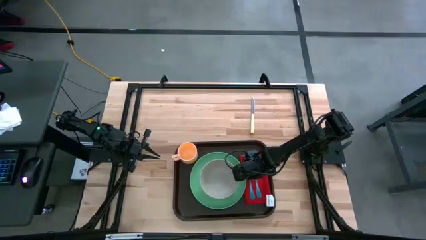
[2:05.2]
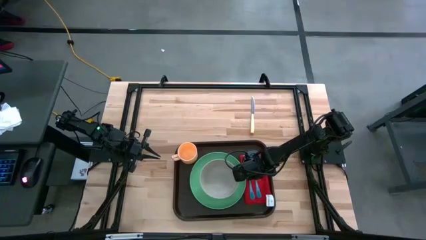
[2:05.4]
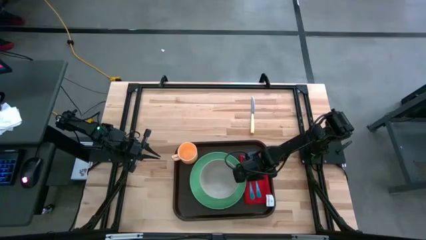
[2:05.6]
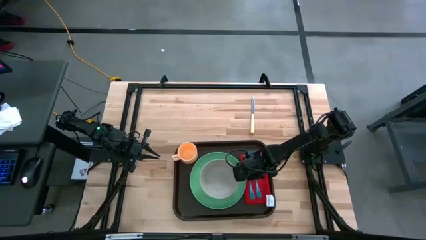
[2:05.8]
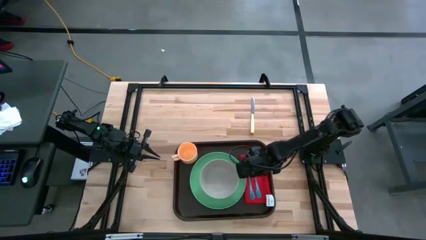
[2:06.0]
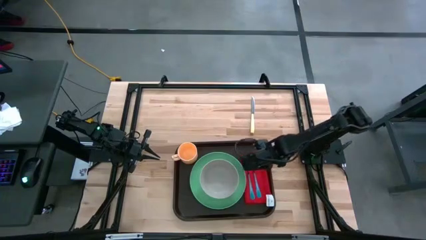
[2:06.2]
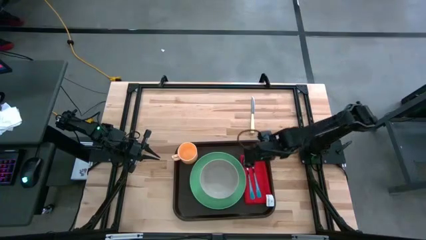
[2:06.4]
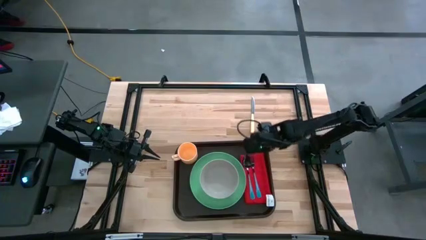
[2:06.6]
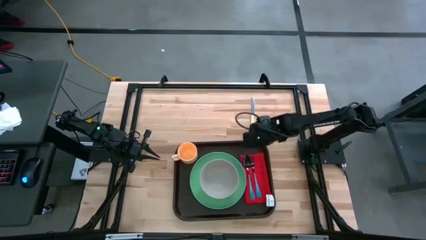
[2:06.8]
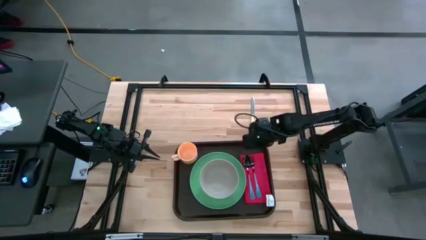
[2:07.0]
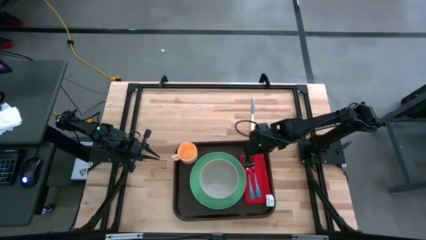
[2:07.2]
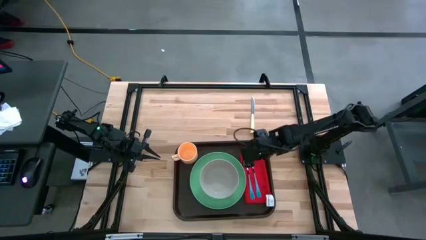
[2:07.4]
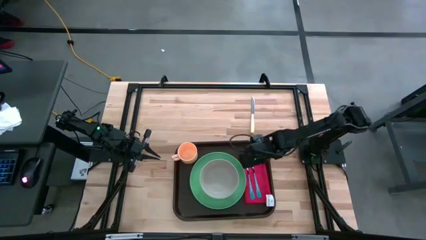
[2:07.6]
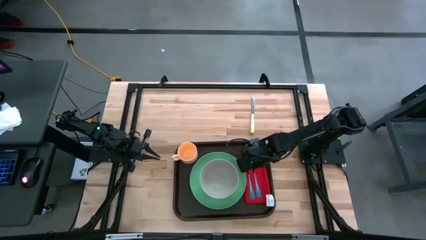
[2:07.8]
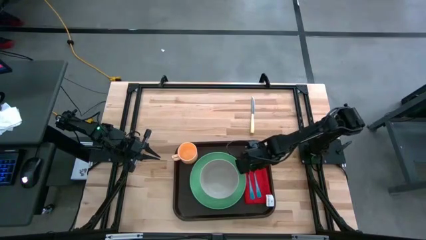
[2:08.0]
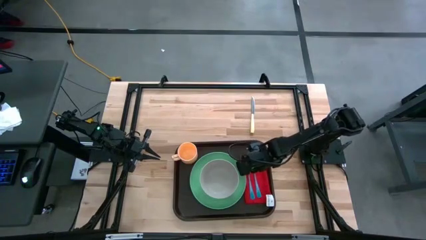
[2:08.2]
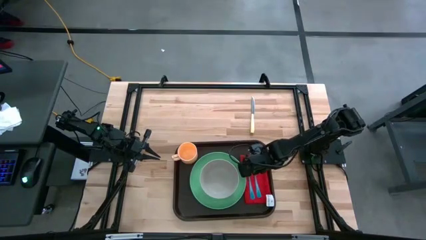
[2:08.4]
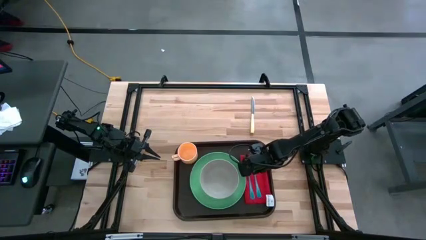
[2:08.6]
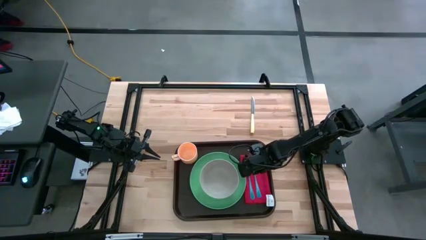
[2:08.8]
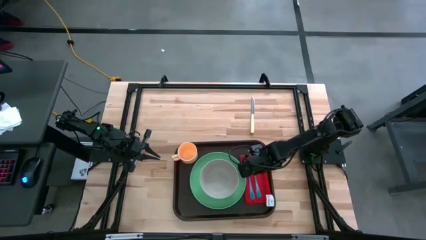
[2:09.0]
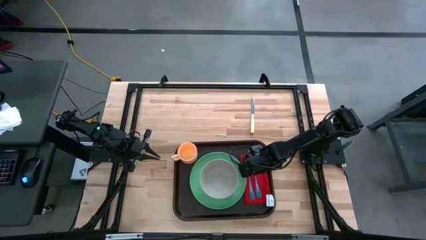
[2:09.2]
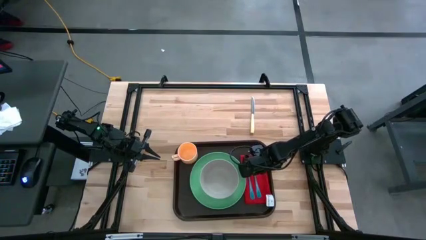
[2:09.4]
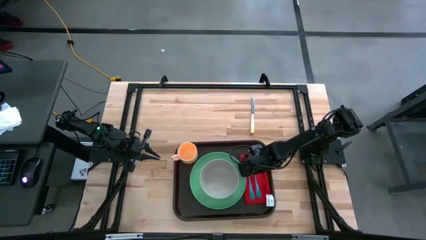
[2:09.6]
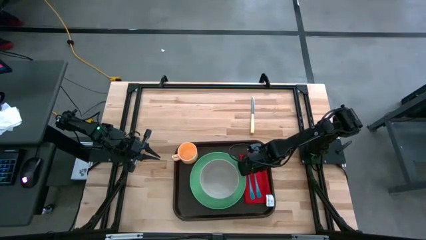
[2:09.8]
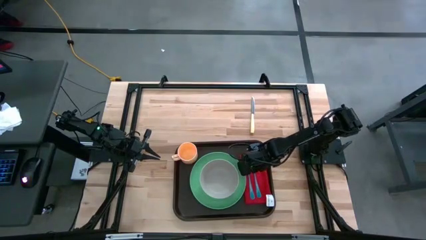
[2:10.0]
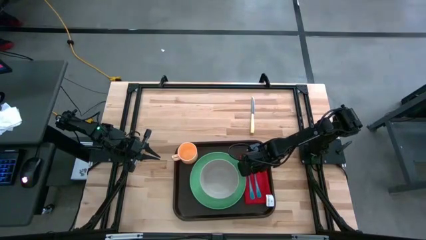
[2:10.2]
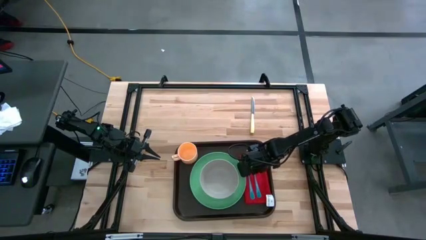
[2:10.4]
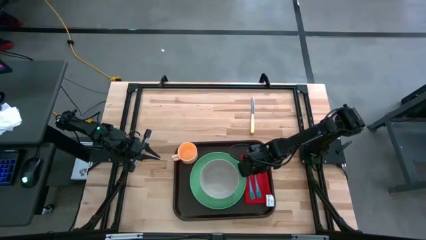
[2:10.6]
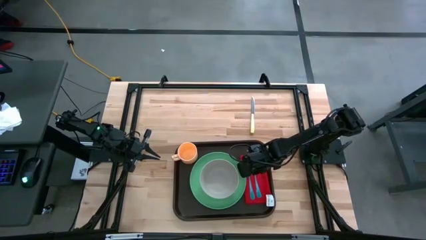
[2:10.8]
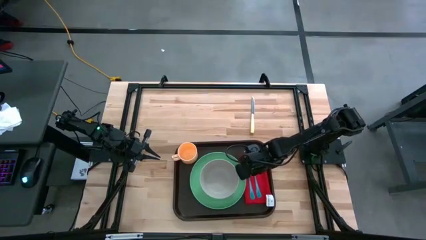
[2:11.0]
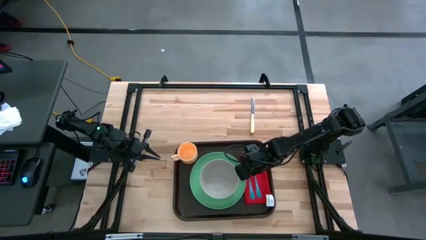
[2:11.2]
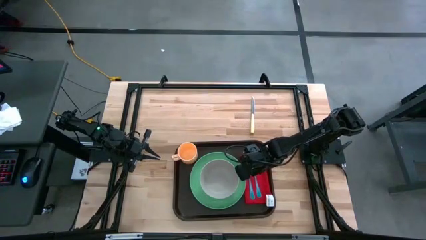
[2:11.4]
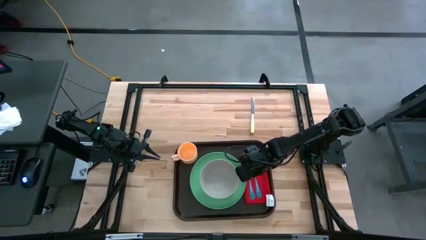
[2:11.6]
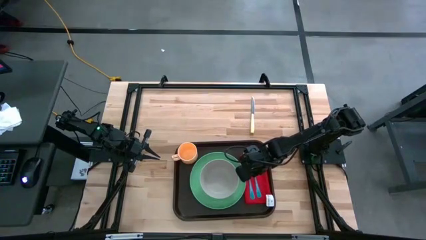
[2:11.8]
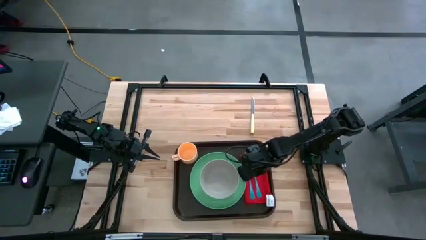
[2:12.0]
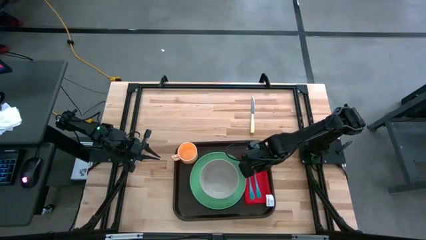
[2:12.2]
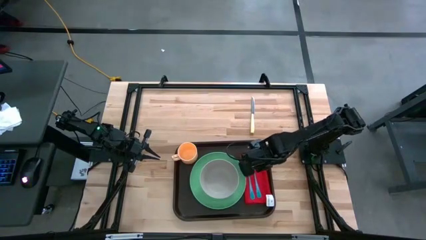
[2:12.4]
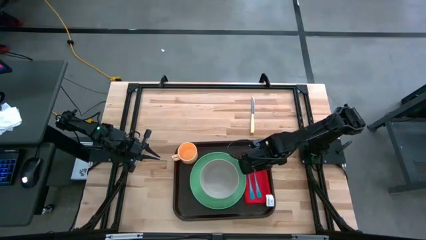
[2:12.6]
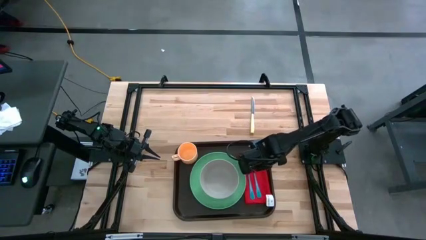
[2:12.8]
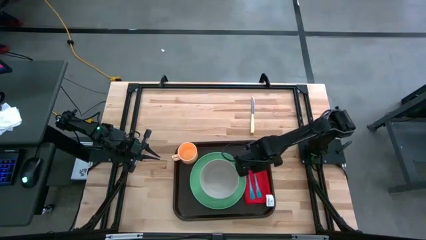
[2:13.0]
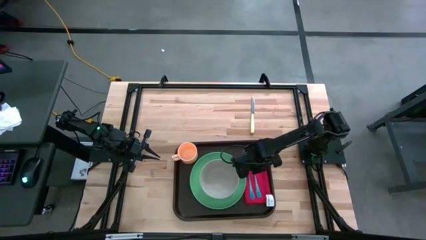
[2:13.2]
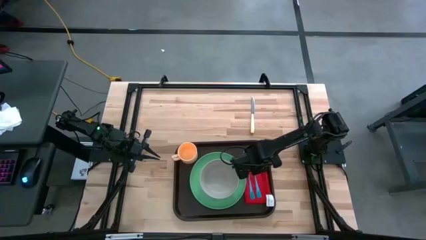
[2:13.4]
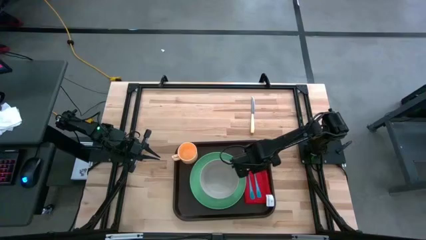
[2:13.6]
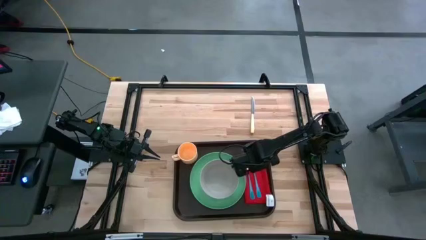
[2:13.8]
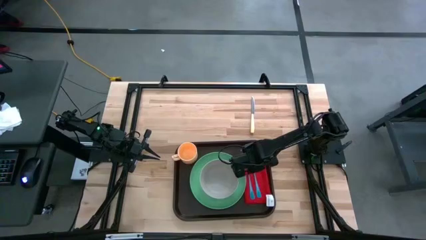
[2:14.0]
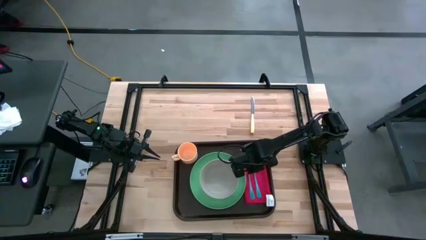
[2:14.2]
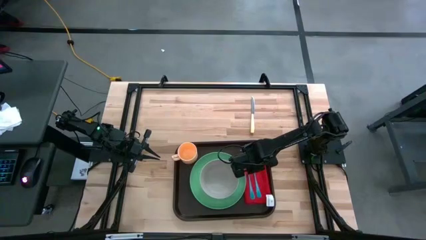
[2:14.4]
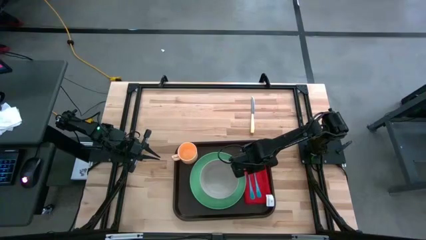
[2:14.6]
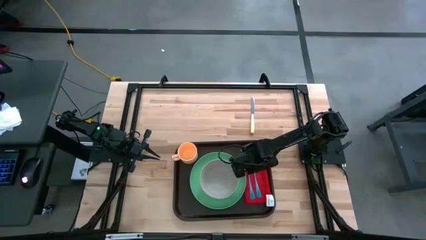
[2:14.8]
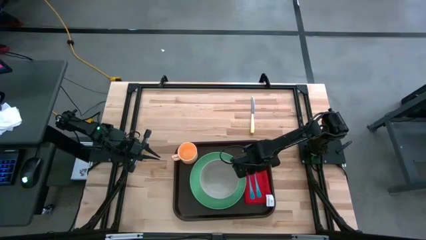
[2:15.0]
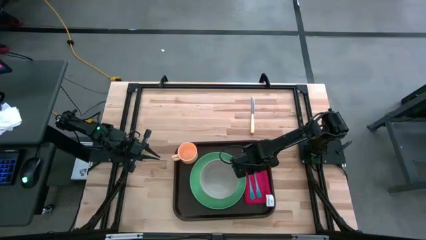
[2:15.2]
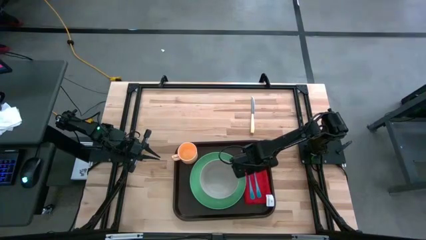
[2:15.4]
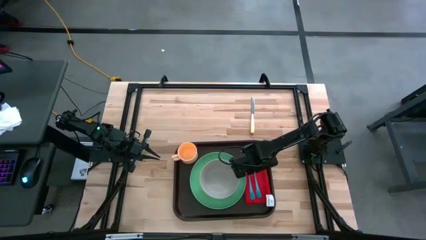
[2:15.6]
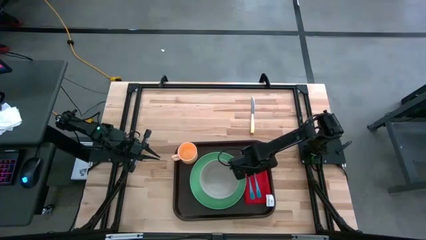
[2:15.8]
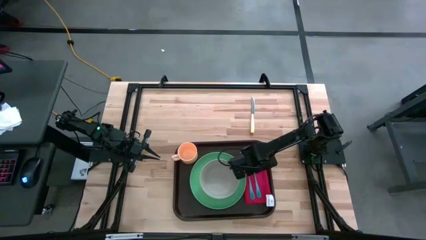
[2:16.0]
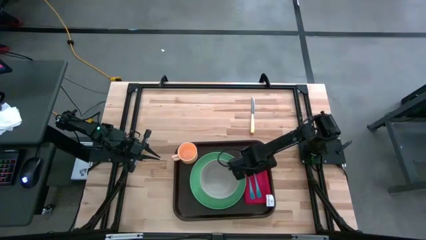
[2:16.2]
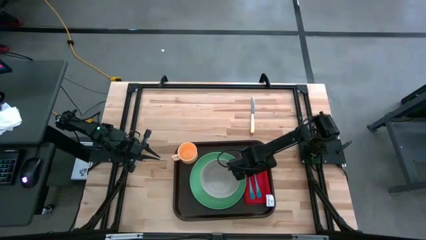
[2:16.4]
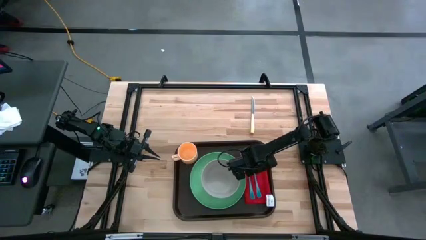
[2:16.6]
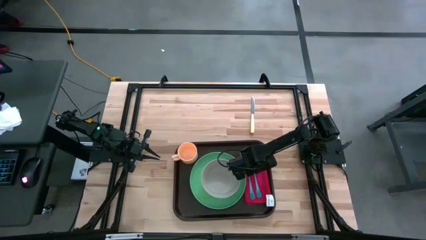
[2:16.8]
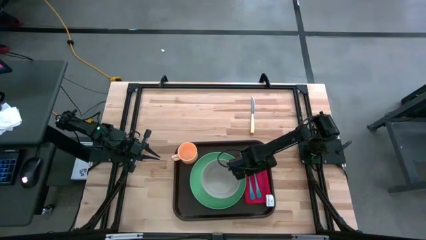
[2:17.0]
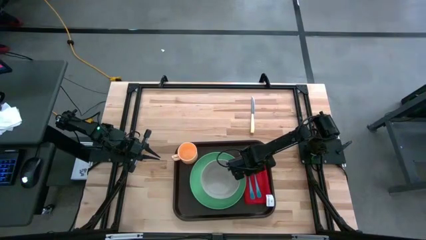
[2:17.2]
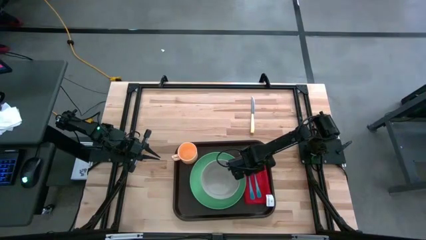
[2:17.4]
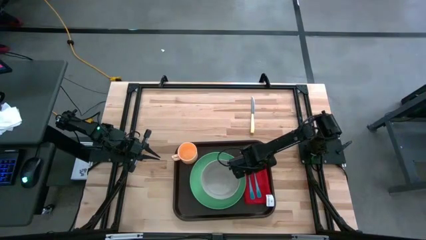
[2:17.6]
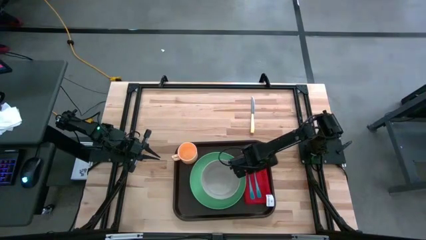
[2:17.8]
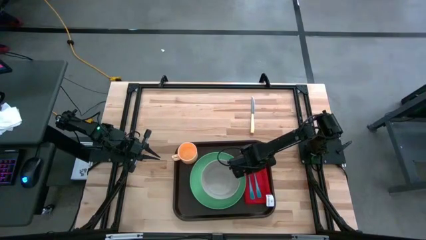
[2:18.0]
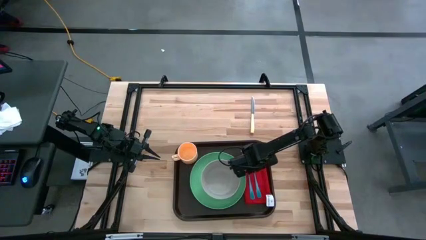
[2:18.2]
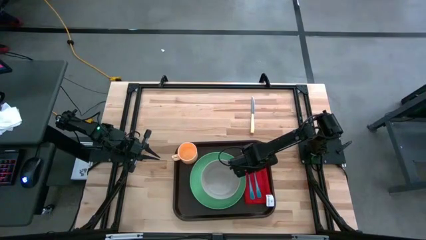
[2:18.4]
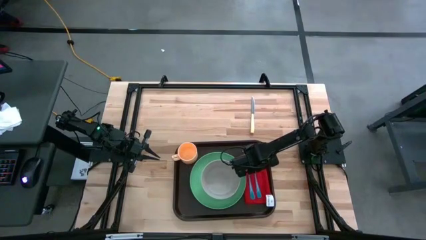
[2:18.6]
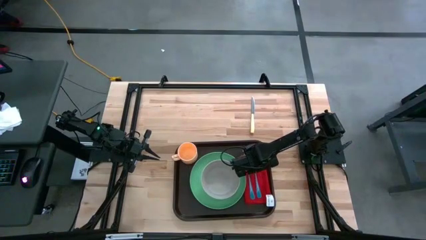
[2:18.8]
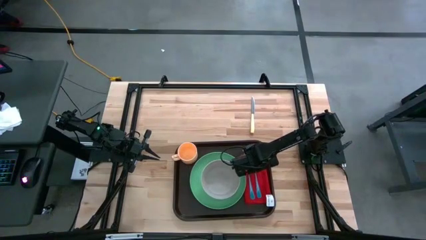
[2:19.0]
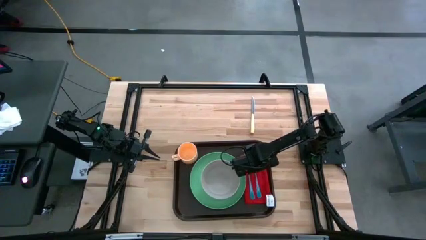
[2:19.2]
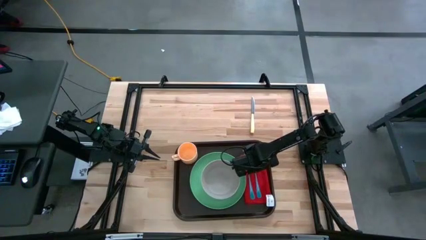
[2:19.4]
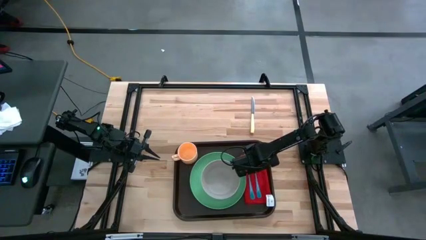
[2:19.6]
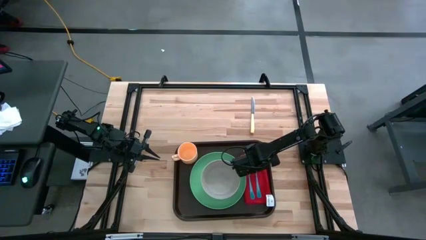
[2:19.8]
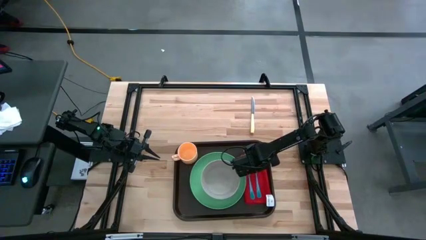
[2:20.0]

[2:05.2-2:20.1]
Task: Set up tray
Adjust the blue fork on the red napkin on the brown serving tray
